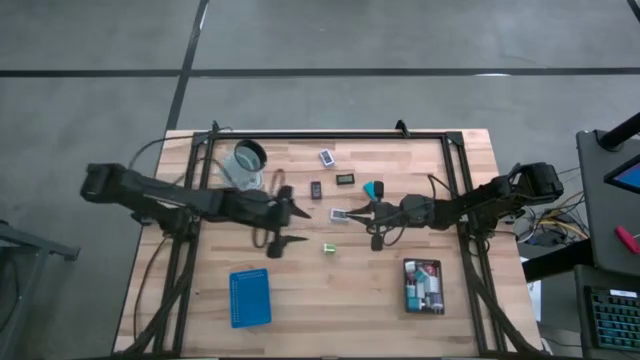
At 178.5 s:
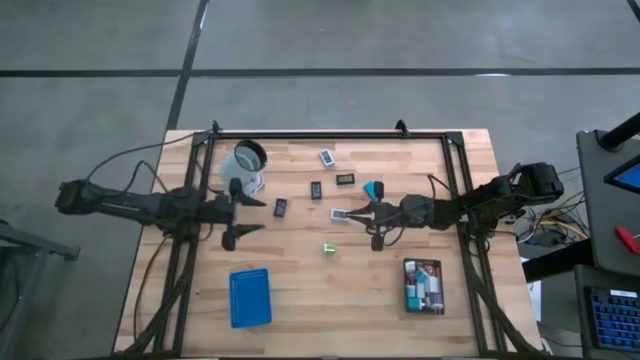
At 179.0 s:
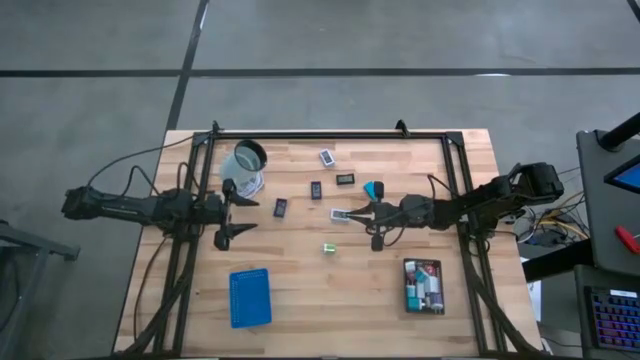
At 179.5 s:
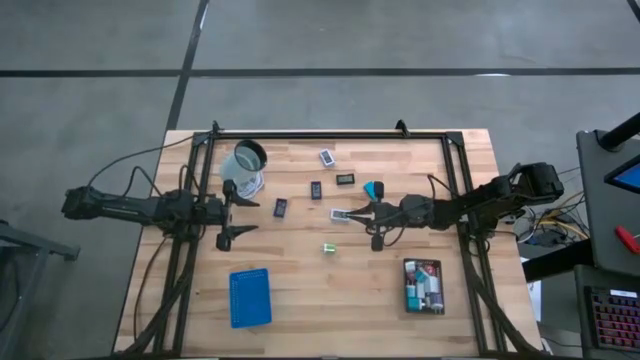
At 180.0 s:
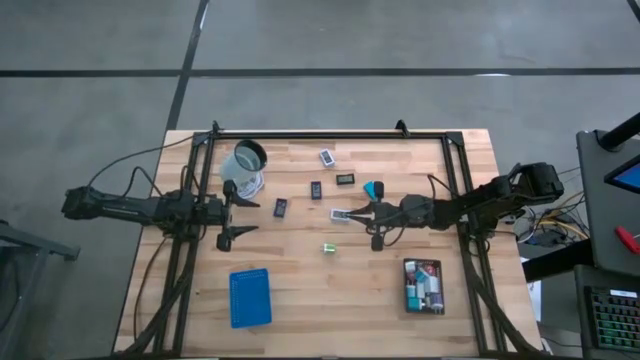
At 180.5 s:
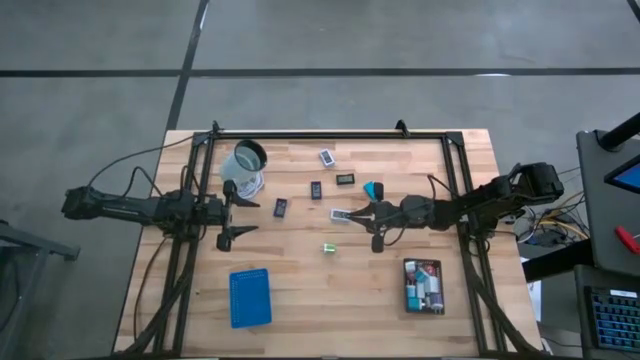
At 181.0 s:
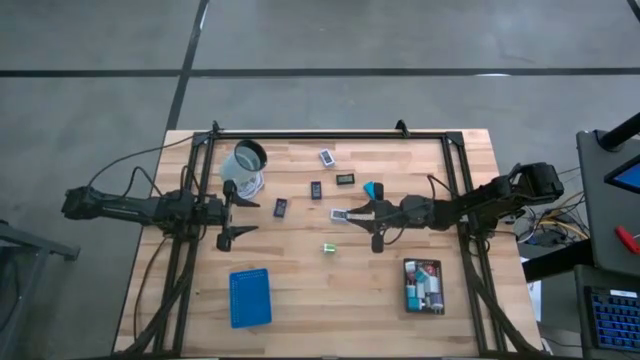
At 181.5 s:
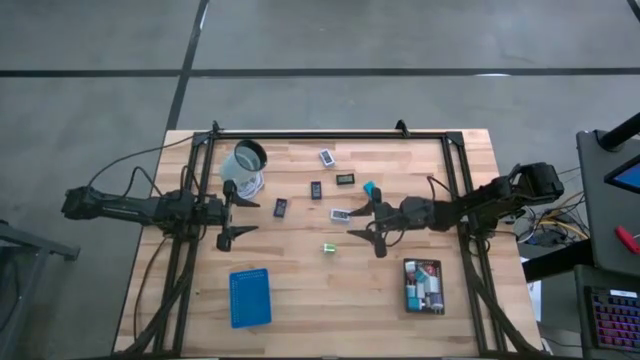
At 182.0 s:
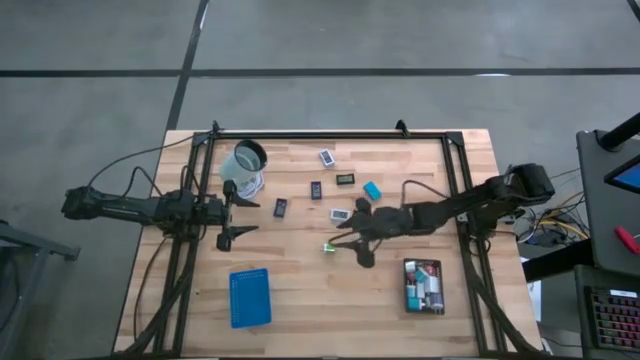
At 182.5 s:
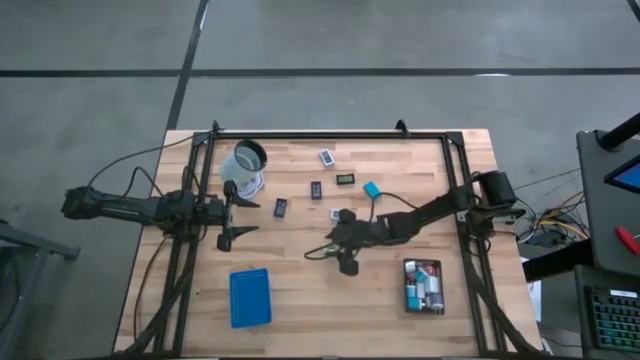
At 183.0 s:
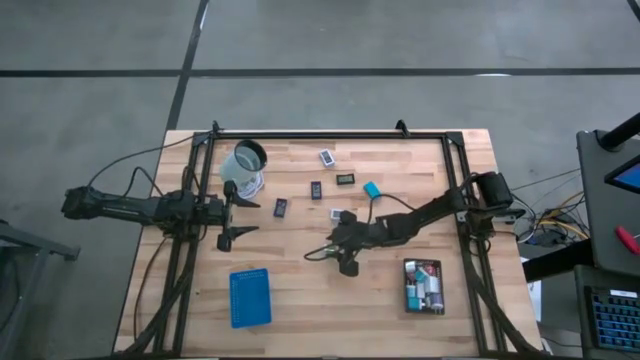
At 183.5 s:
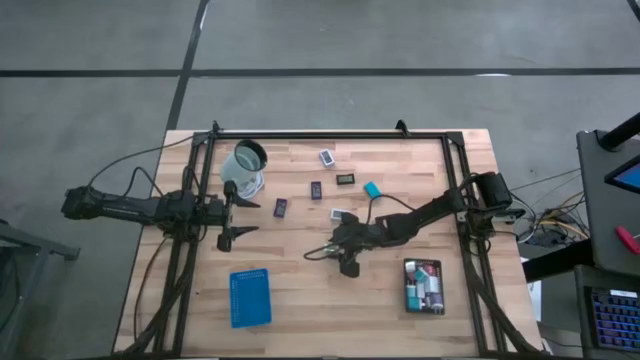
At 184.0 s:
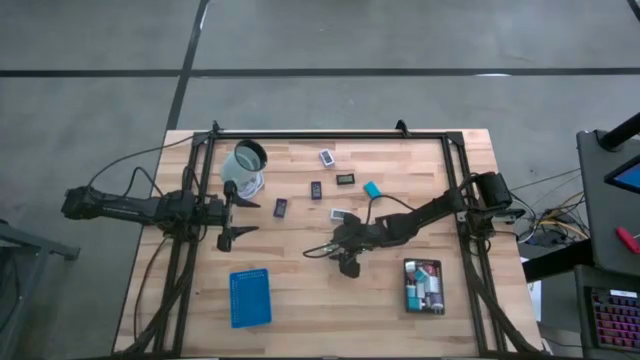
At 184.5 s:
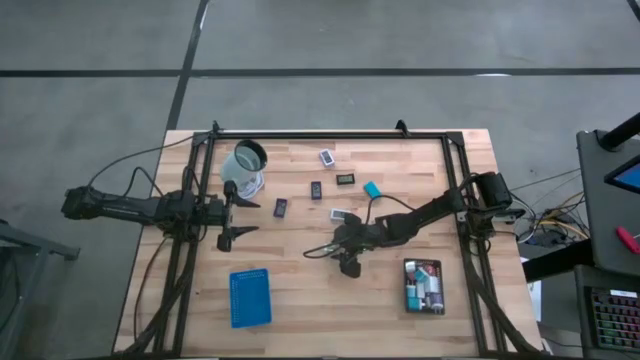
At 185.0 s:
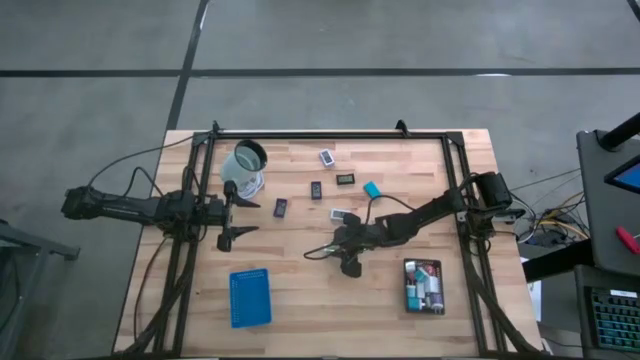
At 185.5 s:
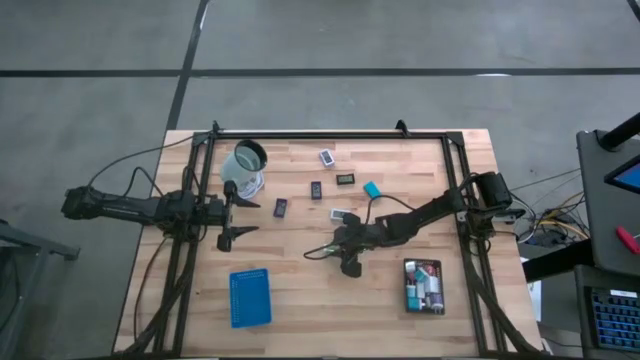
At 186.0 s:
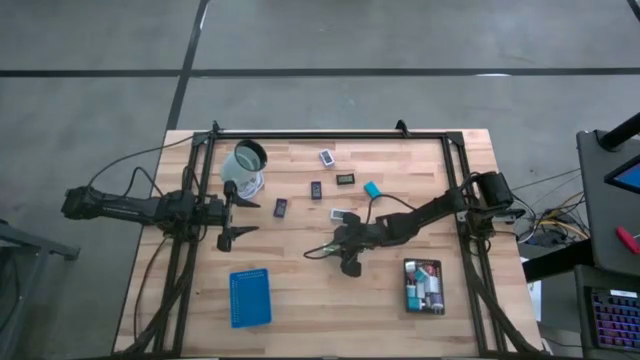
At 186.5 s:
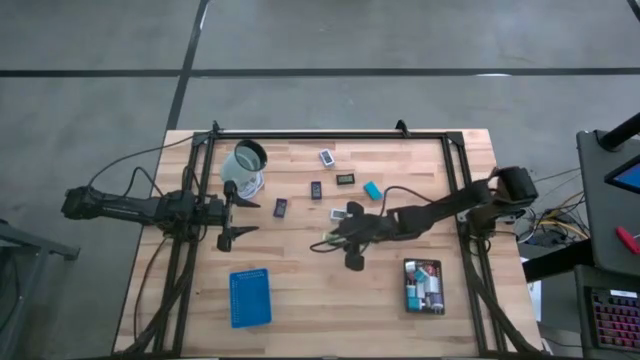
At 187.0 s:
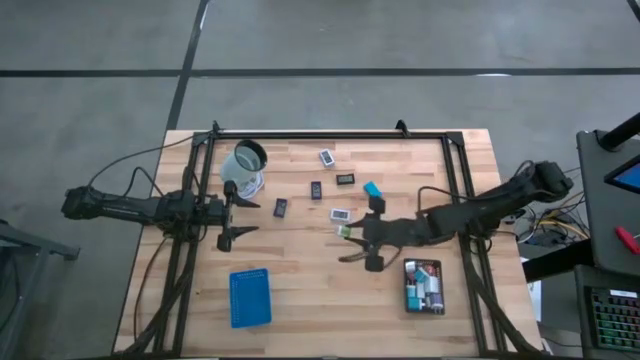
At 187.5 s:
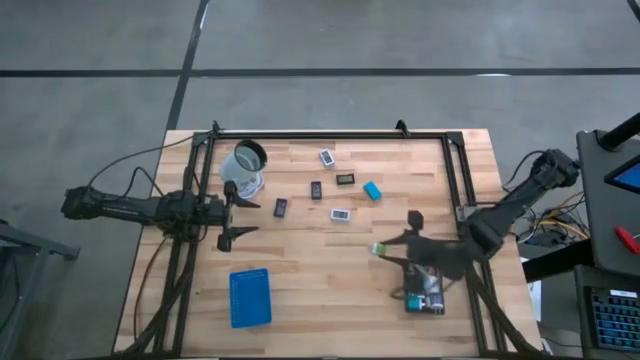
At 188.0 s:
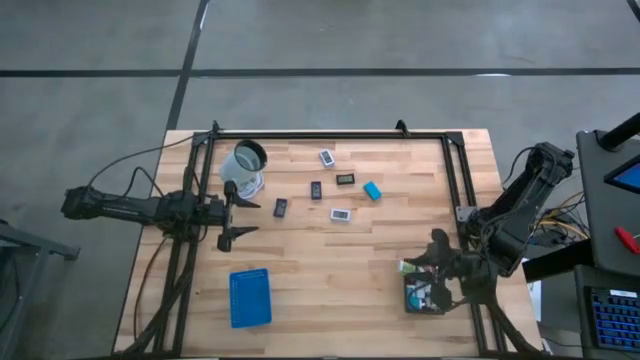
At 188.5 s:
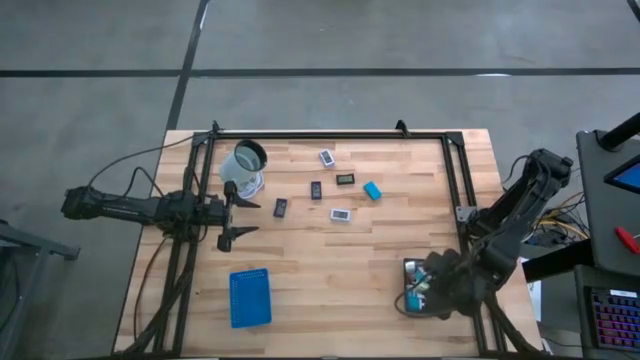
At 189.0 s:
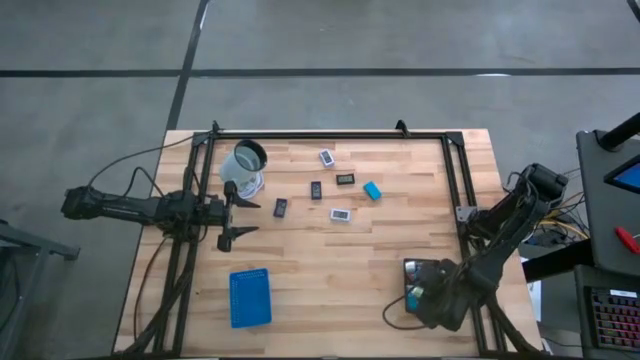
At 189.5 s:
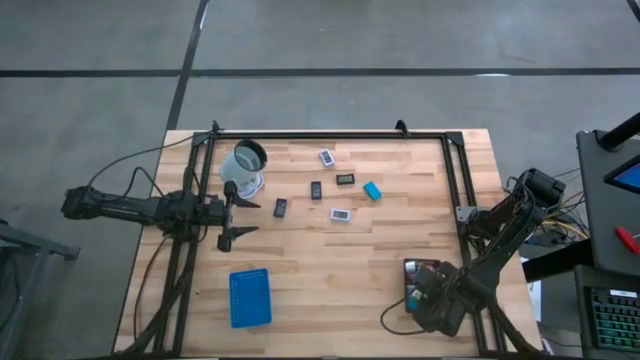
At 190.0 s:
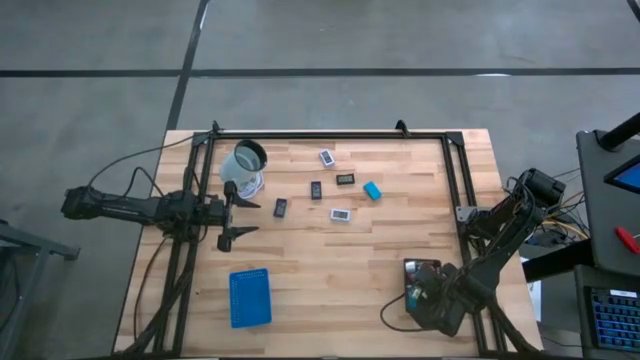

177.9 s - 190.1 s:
Task: Pick & Place Office items
Put the green charger adapter into the black bin

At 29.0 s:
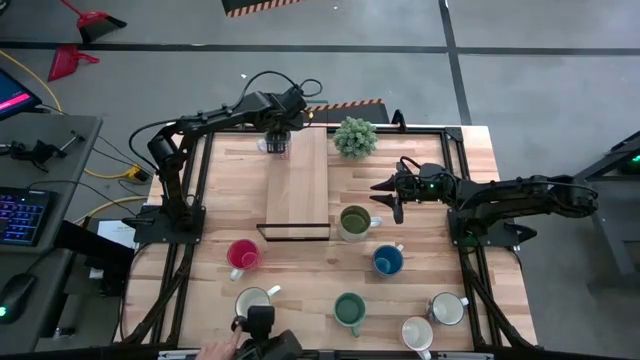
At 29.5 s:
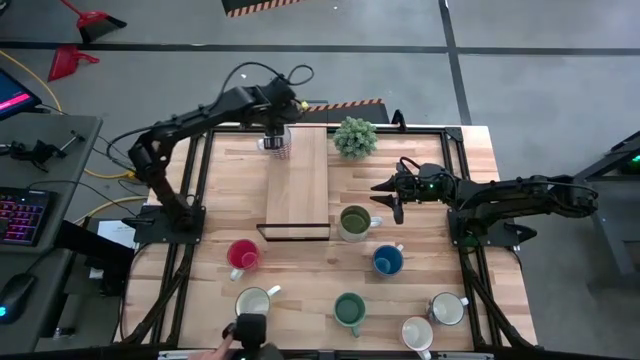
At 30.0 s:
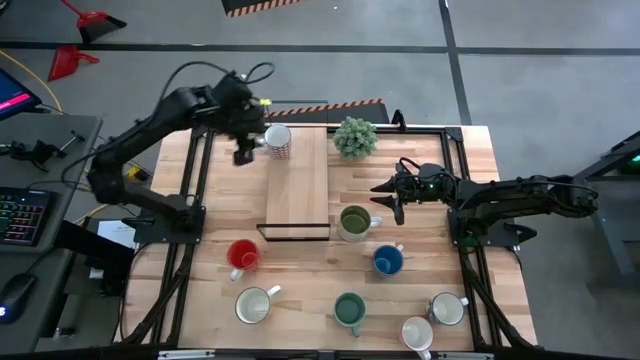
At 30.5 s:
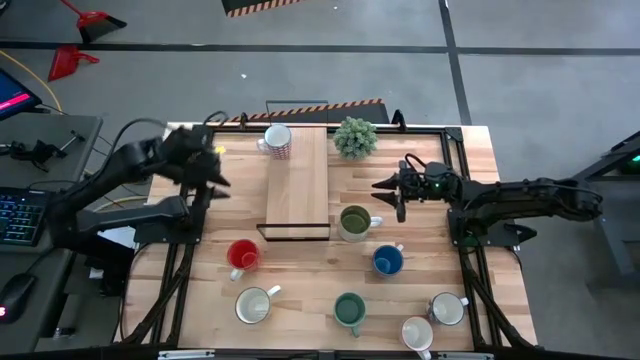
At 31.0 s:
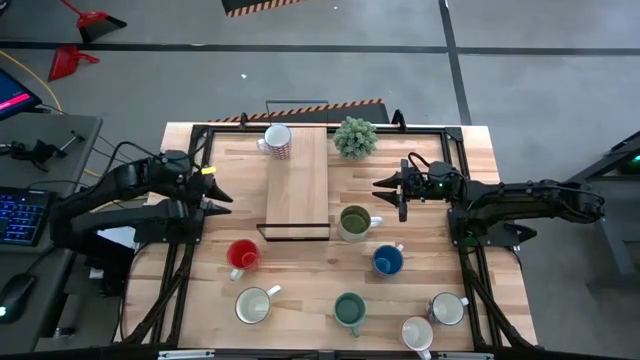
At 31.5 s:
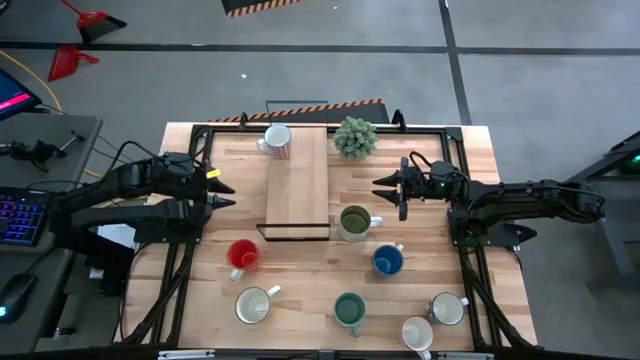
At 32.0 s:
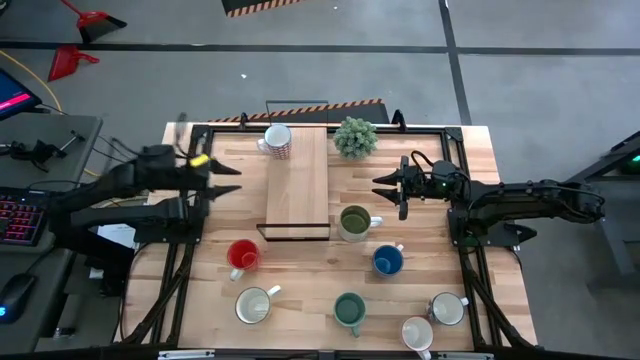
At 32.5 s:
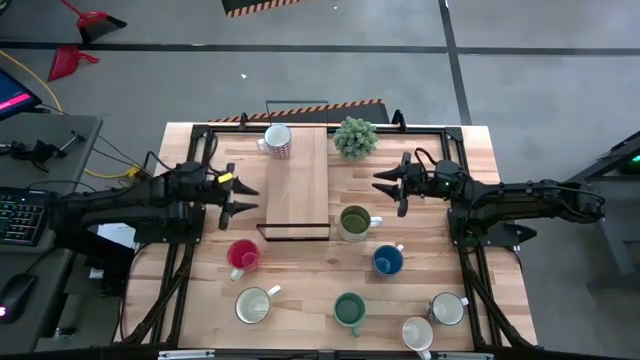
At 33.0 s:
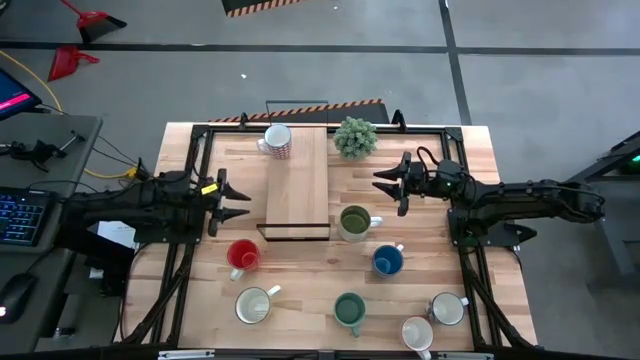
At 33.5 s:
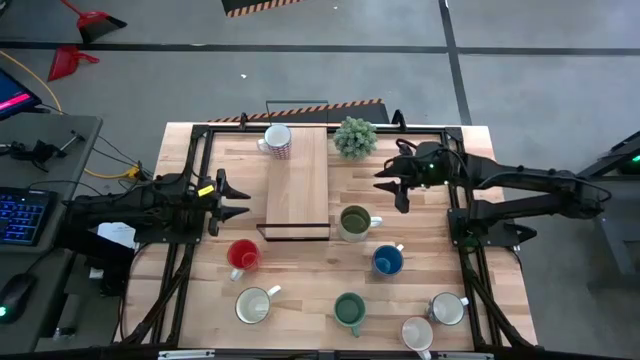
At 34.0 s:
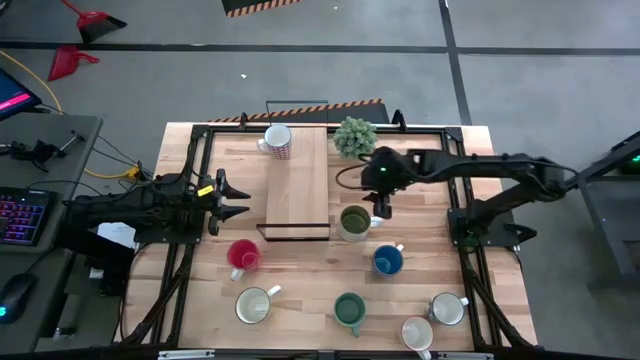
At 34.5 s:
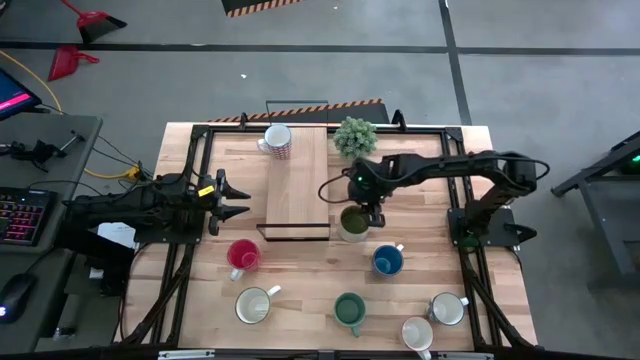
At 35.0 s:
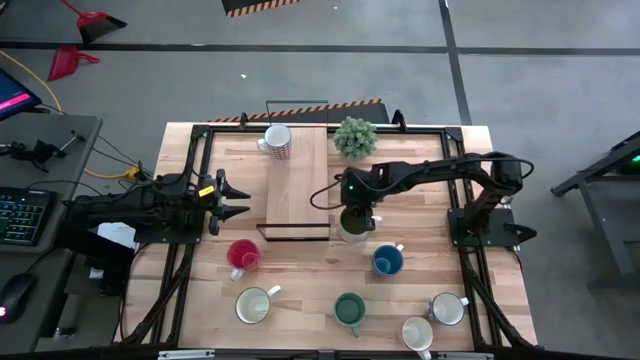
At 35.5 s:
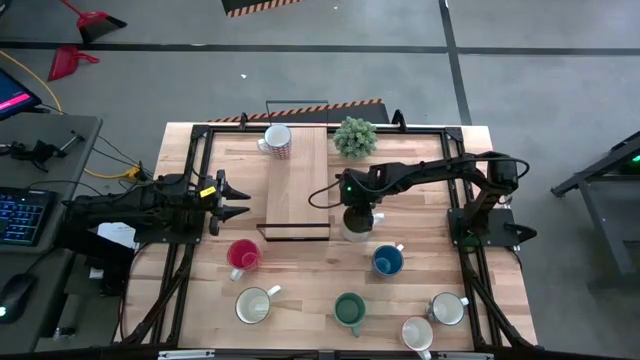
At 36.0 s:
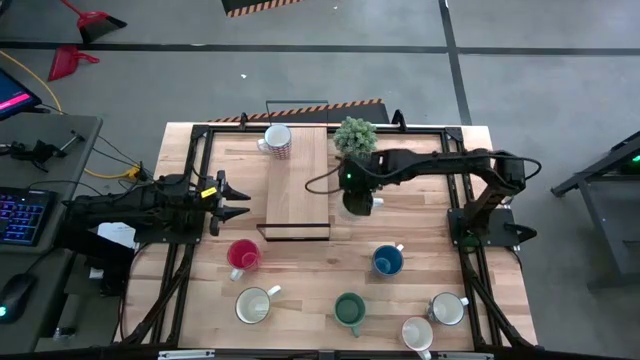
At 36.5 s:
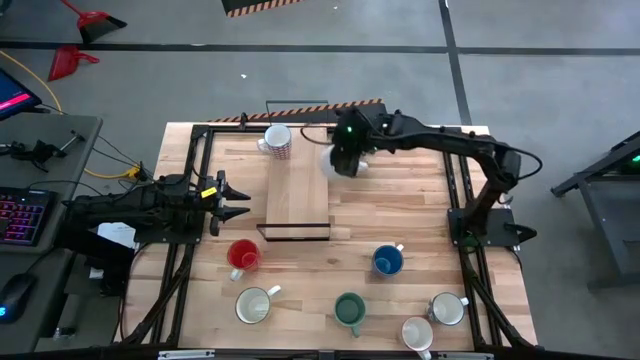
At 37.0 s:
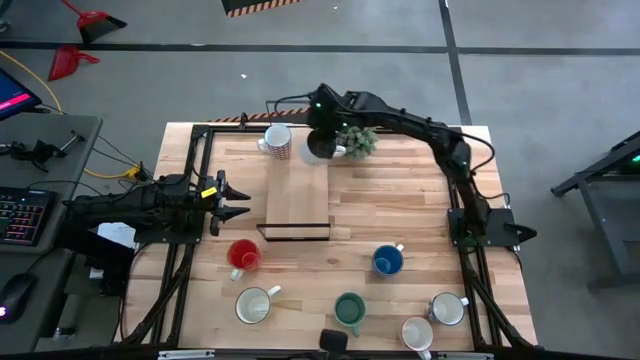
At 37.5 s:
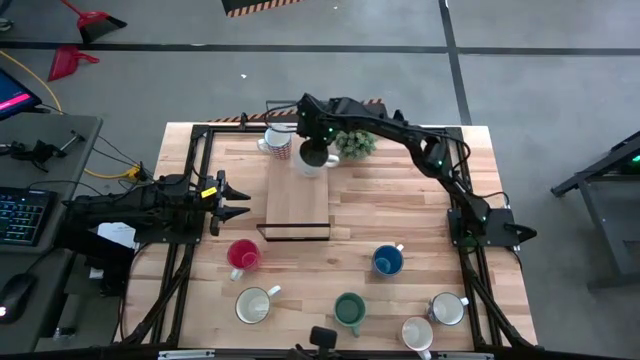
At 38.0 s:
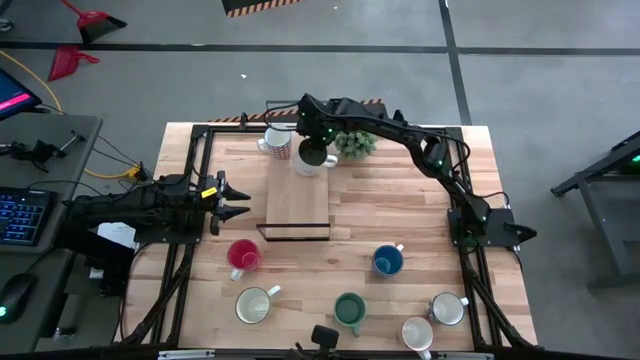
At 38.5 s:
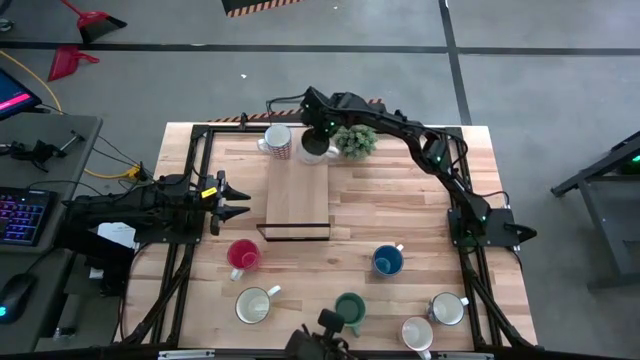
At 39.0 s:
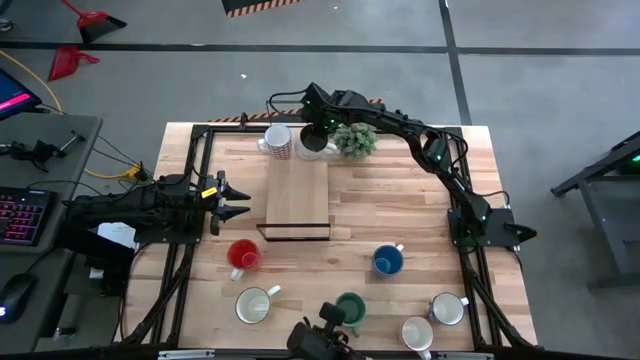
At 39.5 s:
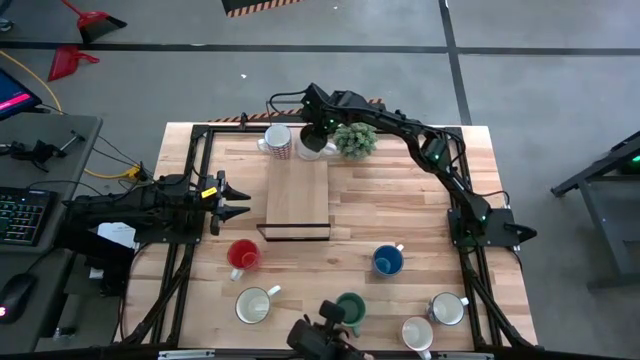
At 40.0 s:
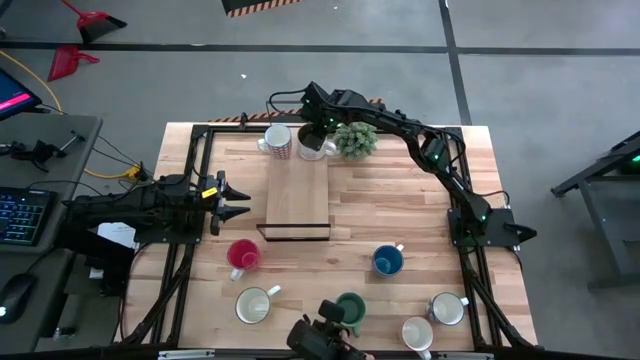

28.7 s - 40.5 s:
Task: Place coffee mugs
Put the white mug on the shelf
